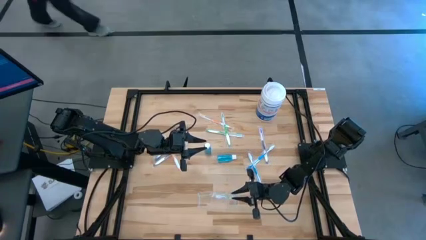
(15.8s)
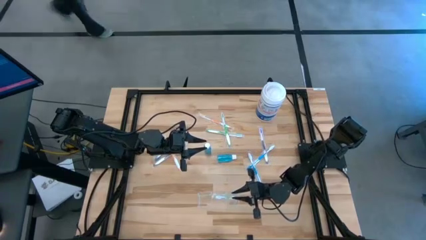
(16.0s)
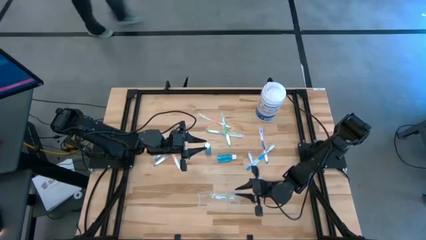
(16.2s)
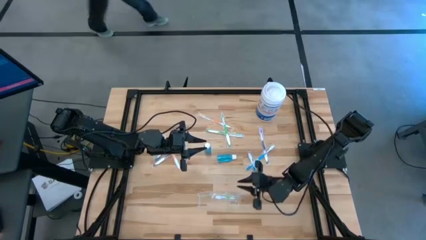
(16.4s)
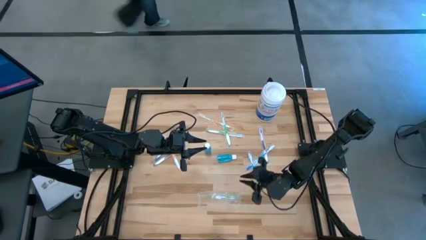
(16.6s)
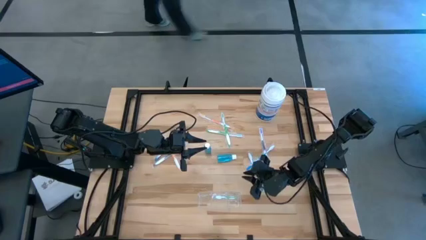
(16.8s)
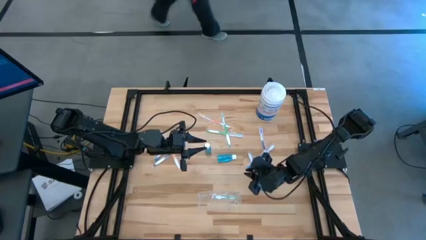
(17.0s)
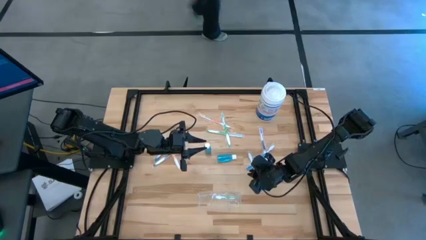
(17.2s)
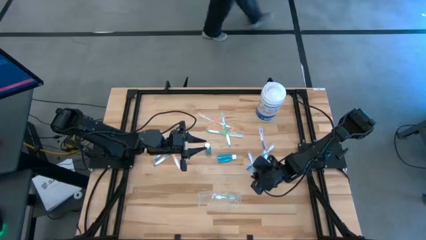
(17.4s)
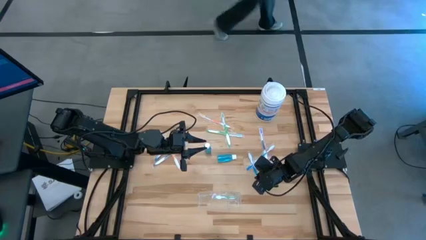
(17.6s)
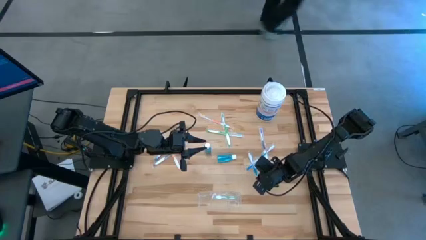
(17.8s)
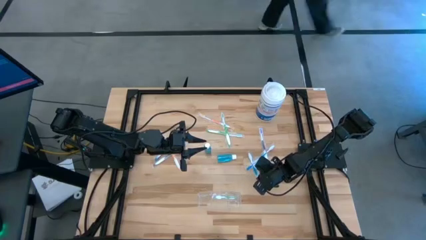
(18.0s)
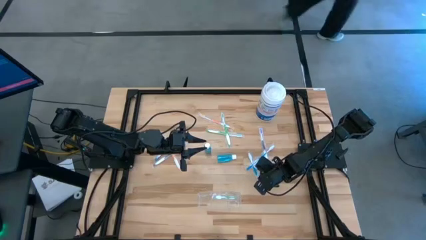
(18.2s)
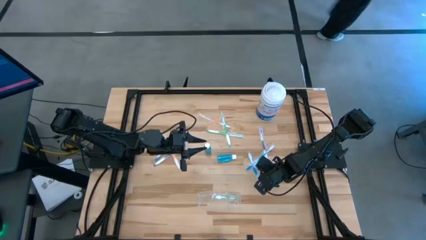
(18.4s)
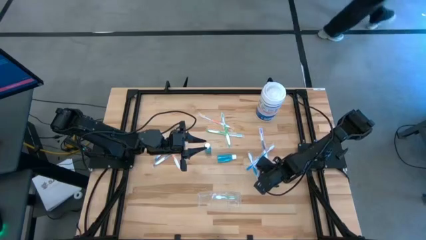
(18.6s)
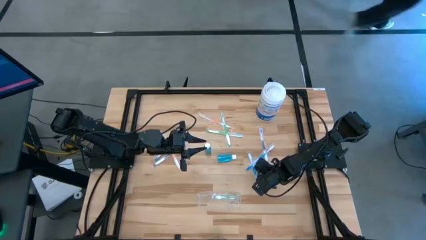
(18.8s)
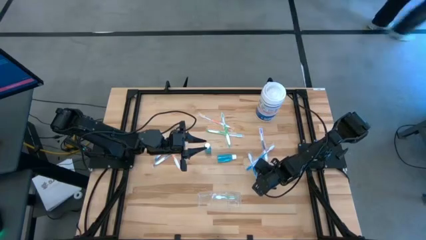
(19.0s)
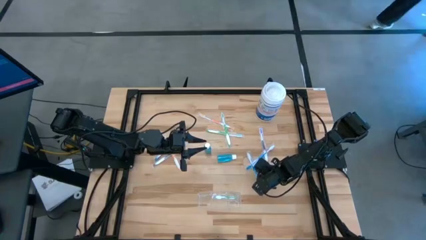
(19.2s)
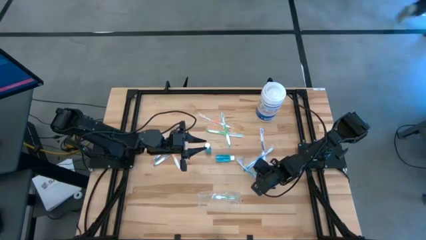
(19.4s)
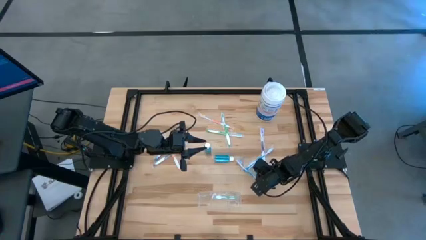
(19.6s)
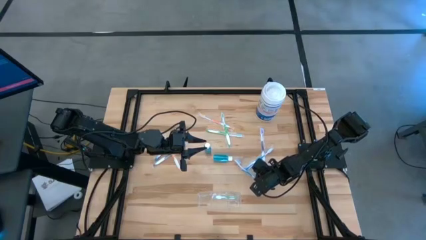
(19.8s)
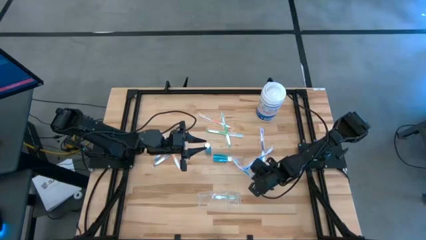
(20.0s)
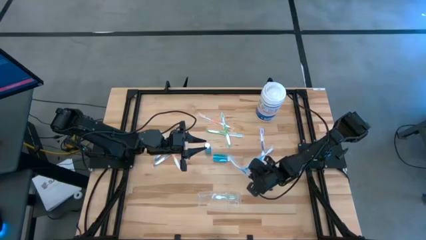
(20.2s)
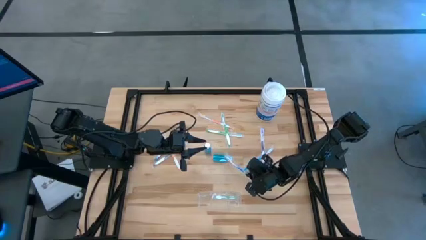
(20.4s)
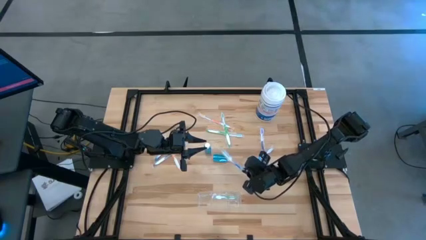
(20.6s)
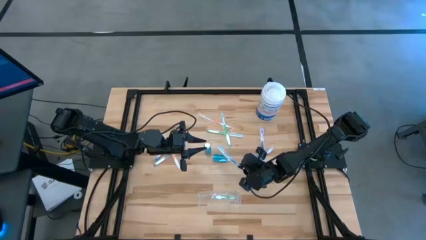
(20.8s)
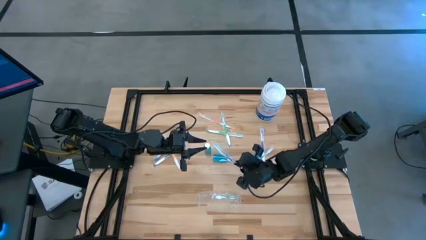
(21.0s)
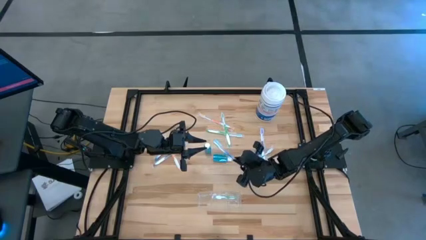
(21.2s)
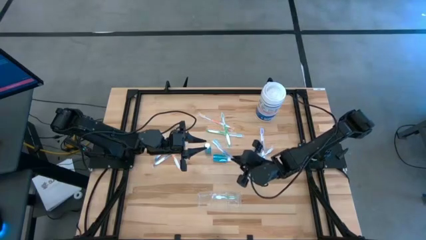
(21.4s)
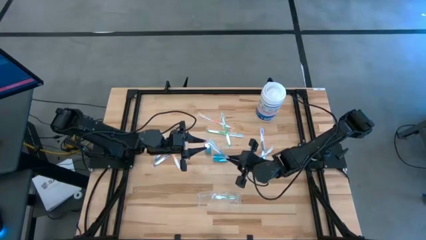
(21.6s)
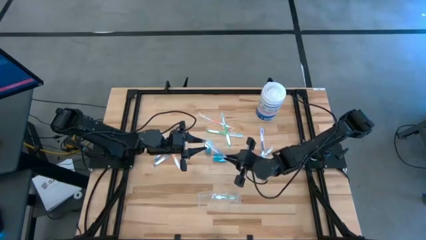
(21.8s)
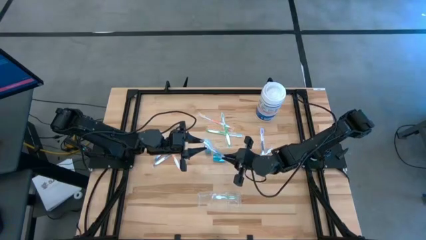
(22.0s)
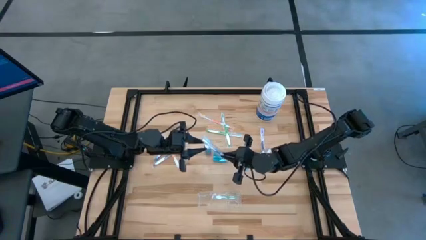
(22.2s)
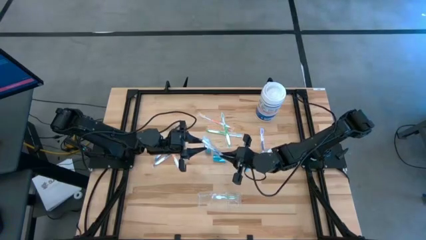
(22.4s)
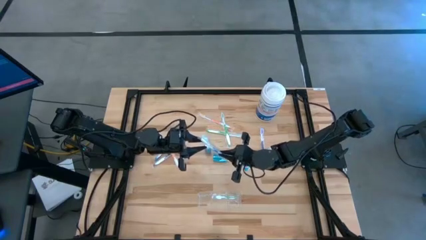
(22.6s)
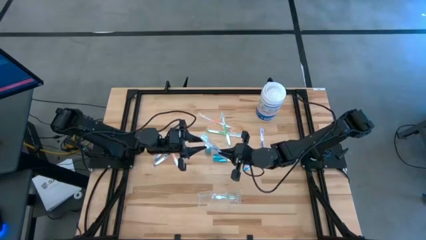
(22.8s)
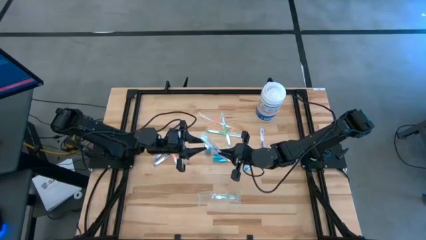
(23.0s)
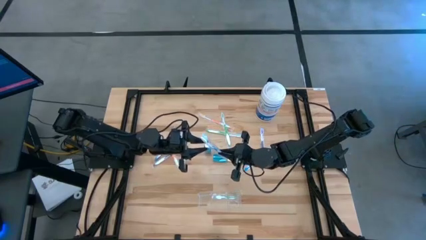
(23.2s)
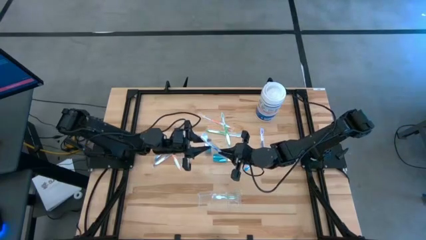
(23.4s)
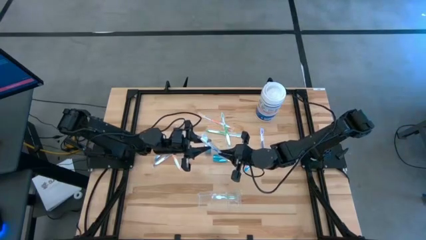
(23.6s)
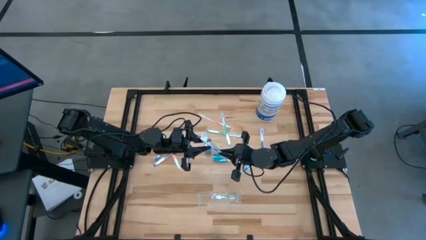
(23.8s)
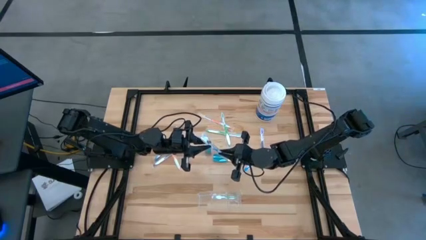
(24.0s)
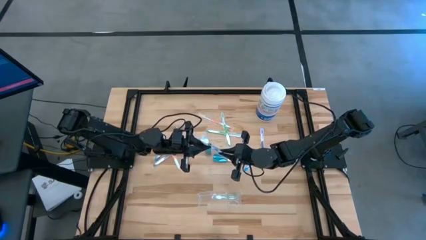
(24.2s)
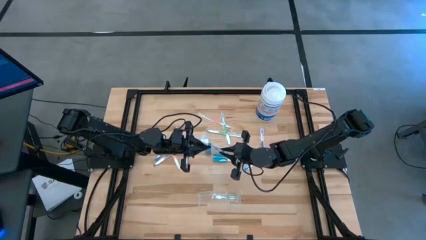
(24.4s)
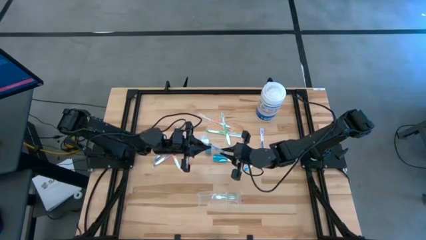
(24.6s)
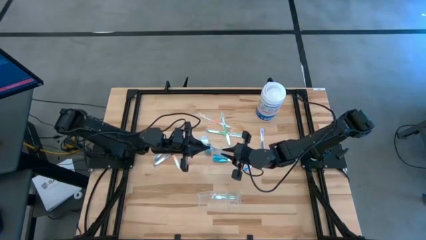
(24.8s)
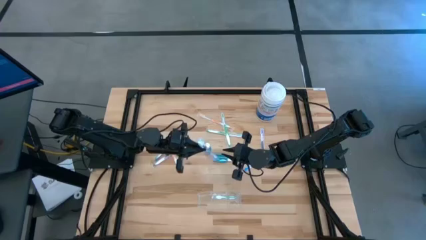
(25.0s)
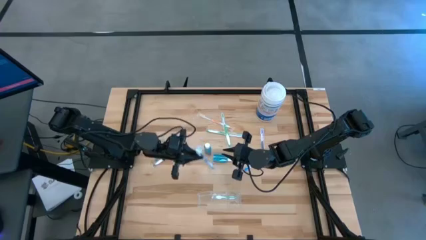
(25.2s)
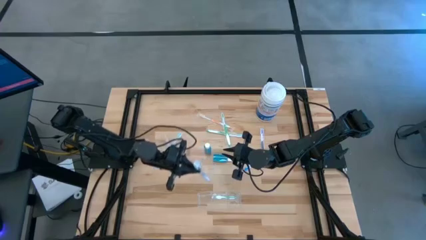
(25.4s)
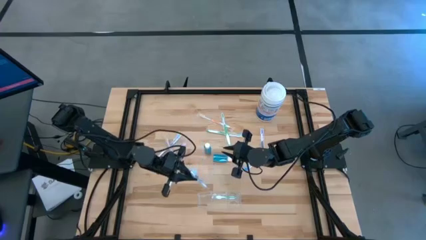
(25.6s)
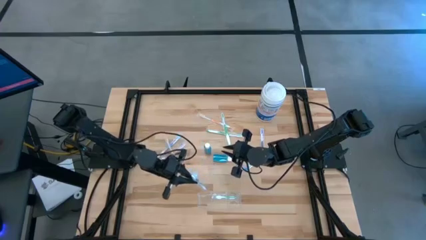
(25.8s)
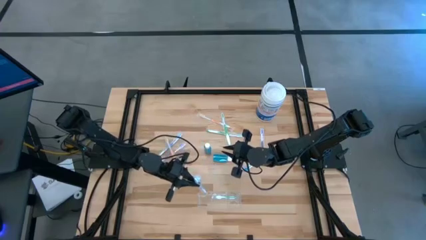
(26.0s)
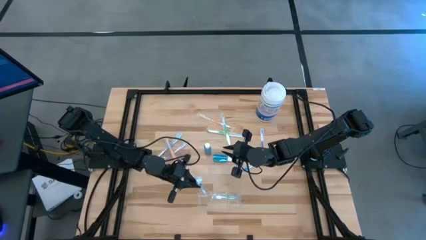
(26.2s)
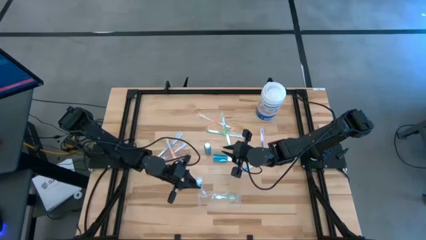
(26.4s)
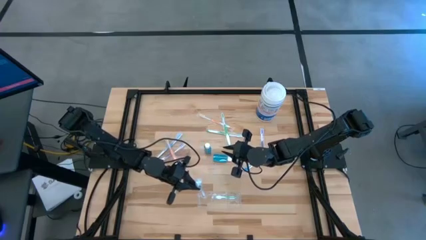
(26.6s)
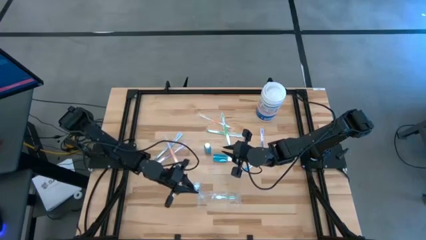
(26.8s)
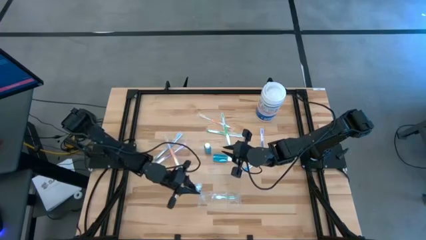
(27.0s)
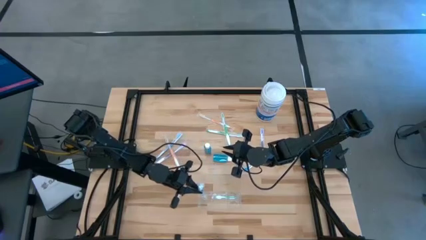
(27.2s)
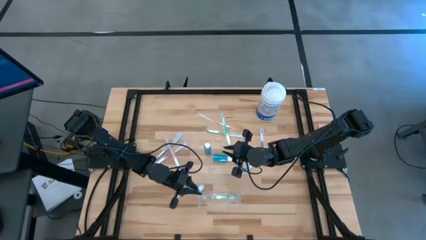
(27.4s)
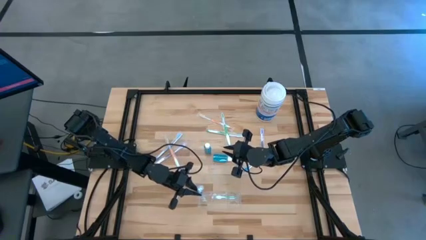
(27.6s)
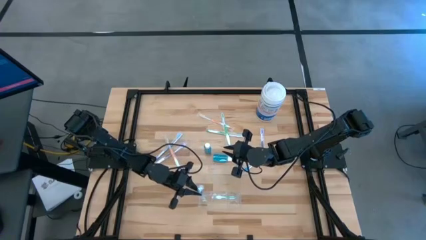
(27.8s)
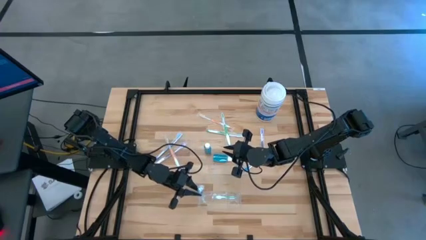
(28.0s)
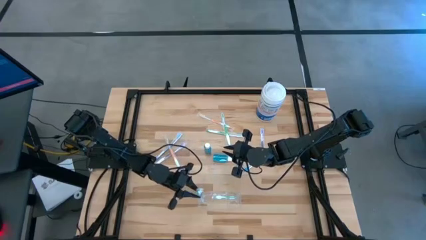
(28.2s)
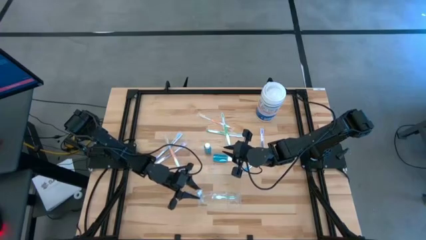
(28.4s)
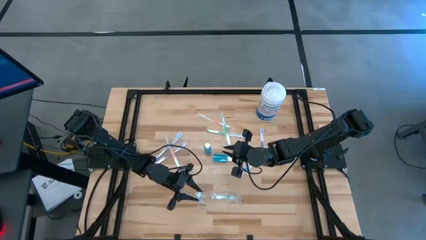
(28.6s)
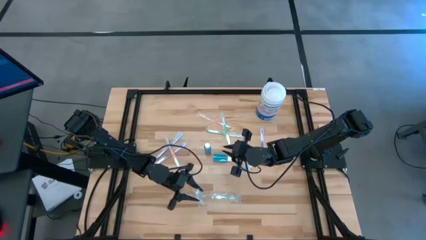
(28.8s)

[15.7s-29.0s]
Task: Pick & Place toothbrushing station
Put the blue toothbrush into the transparent organizer

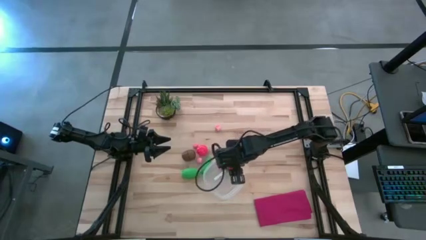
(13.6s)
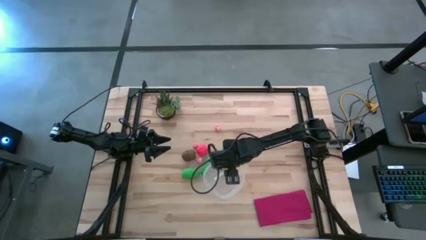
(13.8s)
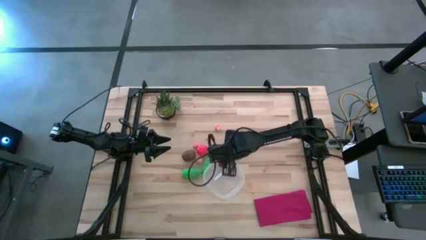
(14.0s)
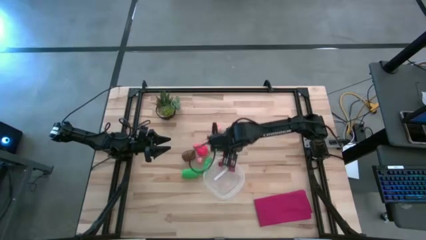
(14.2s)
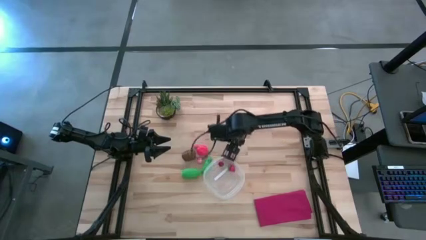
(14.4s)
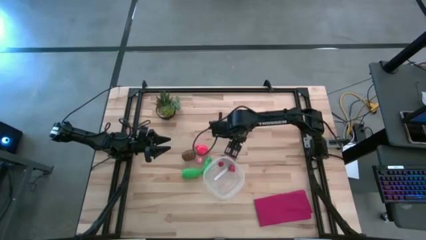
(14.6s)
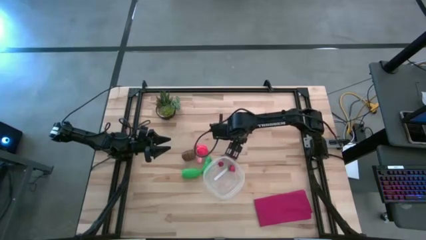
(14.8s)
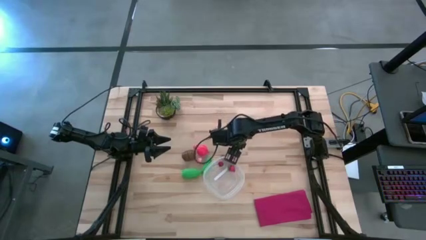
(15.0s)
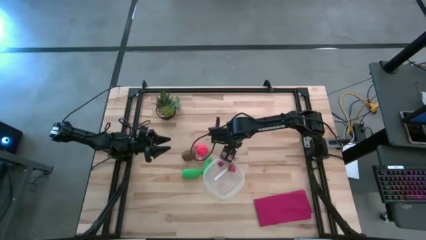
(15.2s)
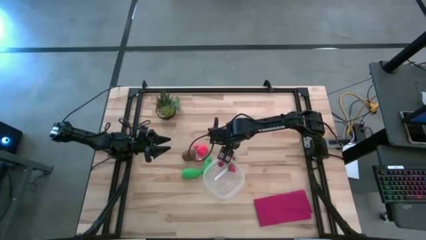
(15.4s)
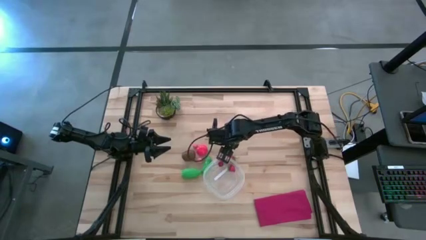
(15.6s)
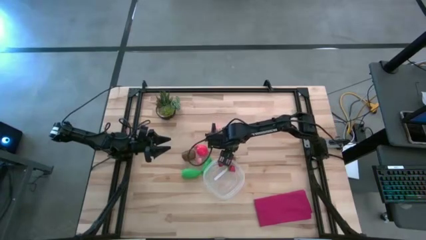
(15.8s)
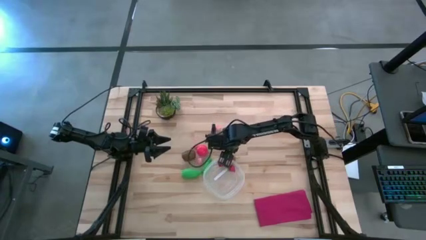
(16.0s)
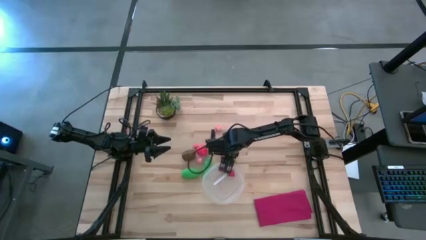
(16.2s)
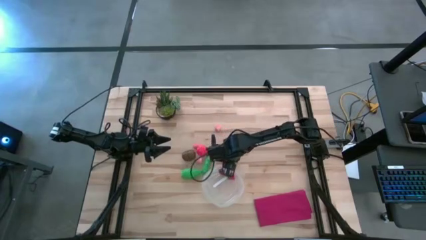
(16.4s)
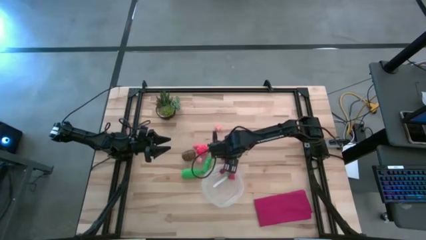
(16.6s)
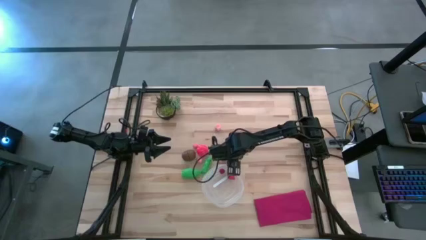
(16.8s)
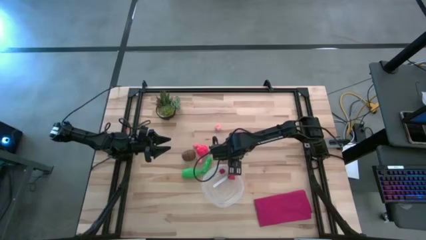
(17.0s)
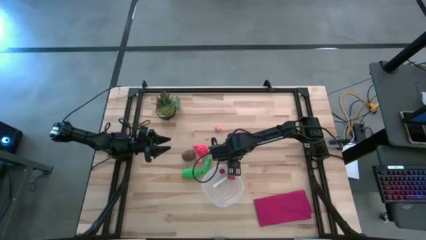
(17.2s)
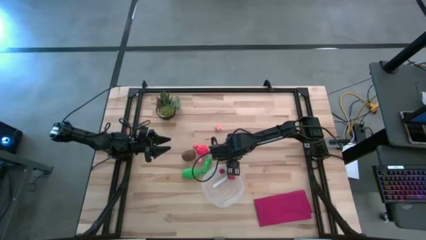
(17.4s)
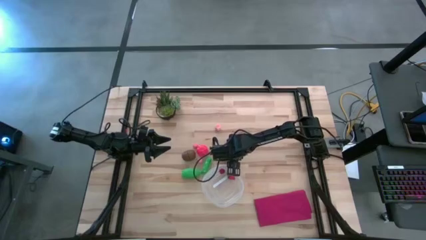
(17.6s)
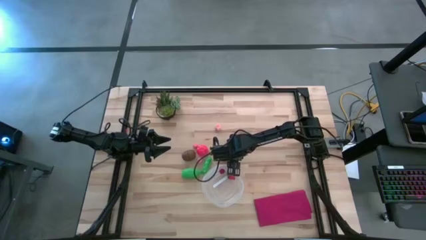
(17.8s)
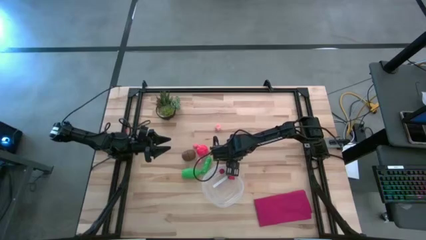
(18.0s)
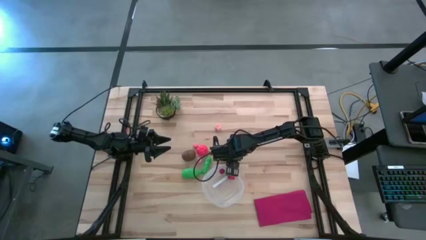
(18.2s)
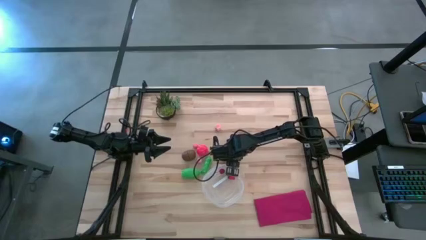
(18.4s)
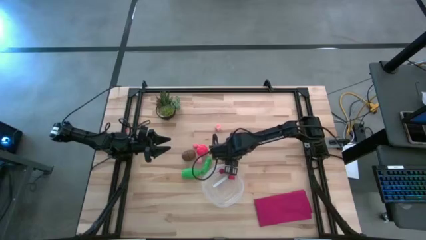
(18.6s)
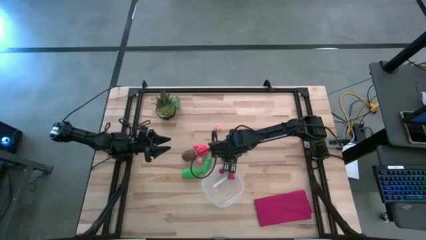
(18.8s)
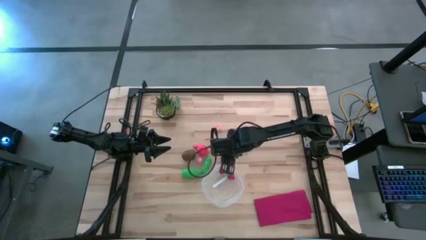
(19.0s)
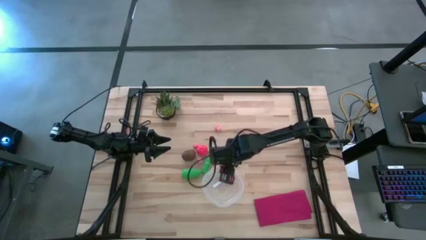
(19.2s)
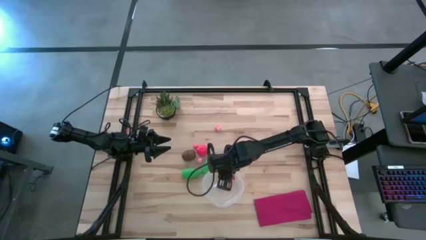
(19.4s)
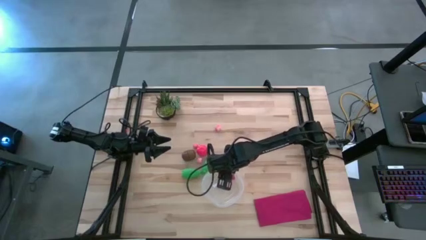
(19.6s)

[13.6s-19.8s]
Task: Pick and placing Produce into tupperware
Put the red strawberry into the transparent bin
